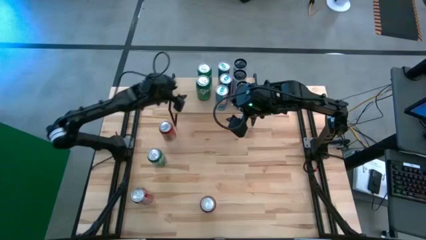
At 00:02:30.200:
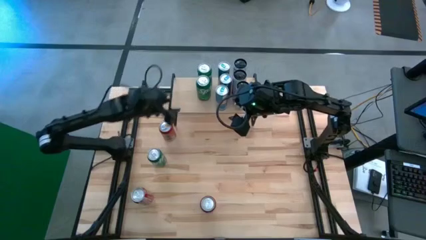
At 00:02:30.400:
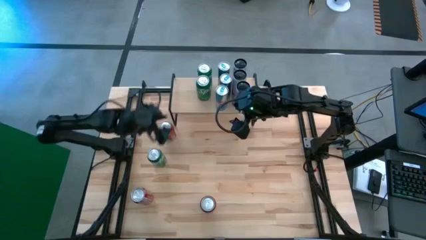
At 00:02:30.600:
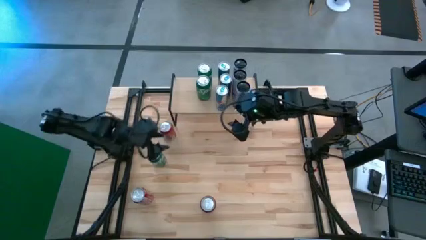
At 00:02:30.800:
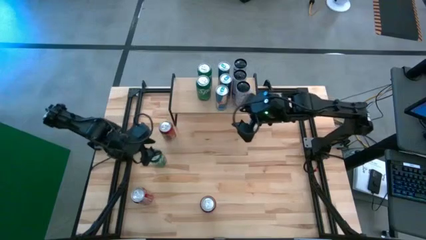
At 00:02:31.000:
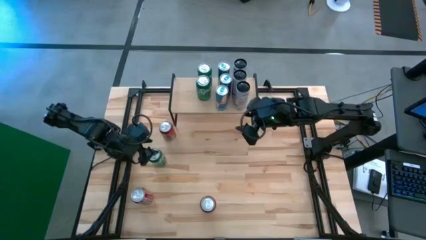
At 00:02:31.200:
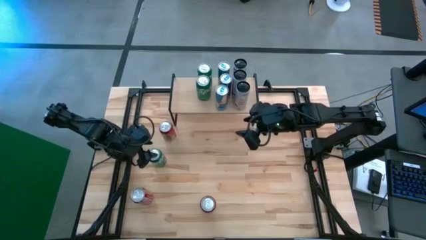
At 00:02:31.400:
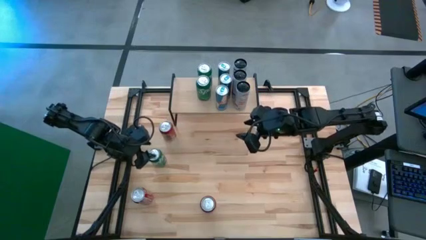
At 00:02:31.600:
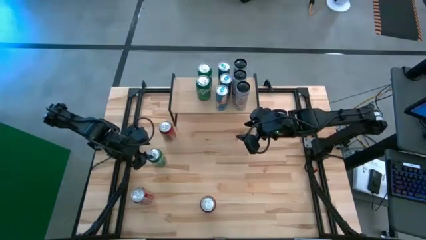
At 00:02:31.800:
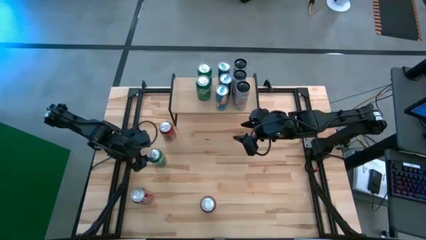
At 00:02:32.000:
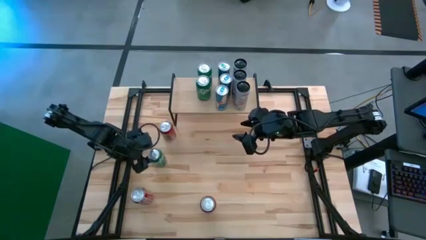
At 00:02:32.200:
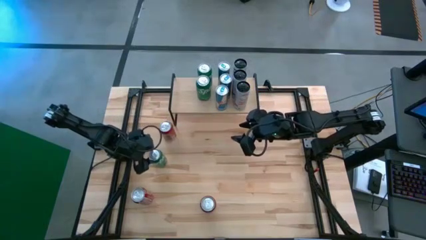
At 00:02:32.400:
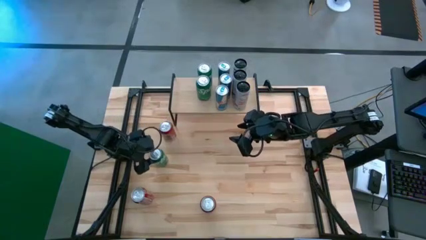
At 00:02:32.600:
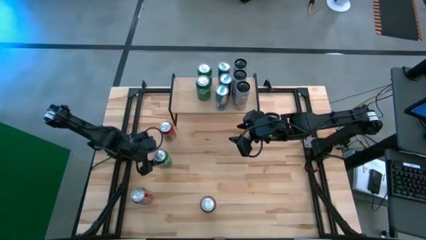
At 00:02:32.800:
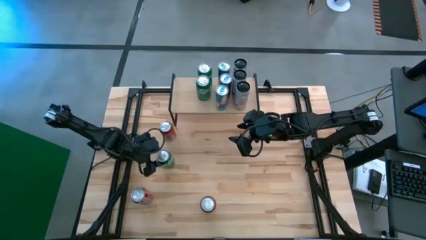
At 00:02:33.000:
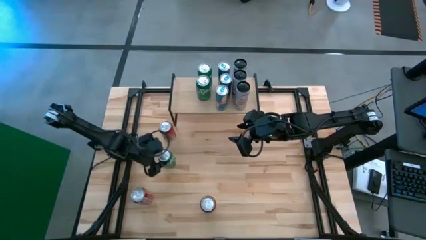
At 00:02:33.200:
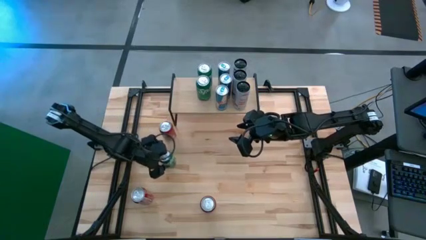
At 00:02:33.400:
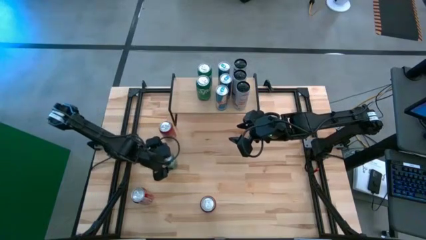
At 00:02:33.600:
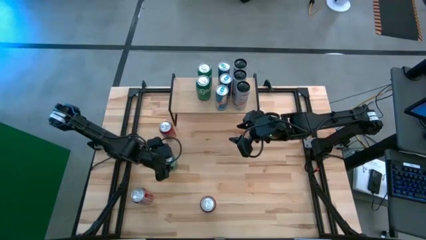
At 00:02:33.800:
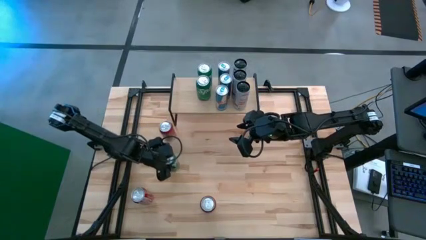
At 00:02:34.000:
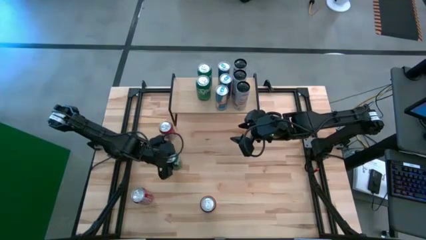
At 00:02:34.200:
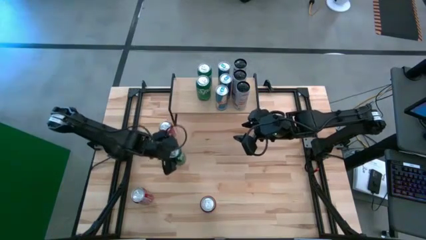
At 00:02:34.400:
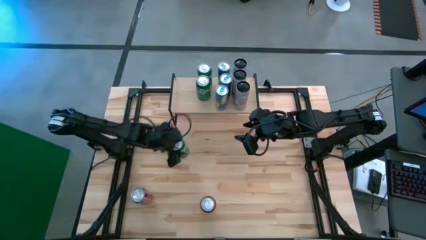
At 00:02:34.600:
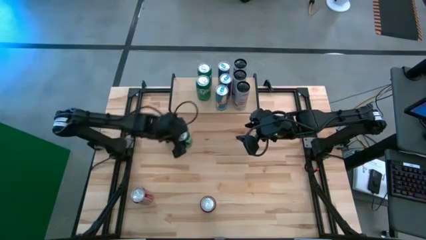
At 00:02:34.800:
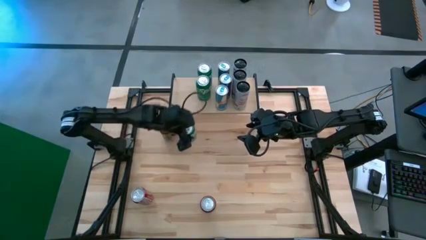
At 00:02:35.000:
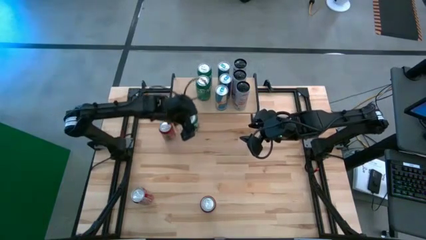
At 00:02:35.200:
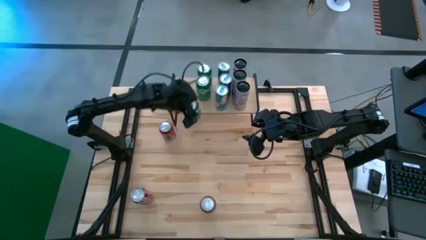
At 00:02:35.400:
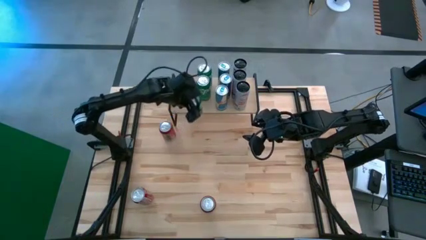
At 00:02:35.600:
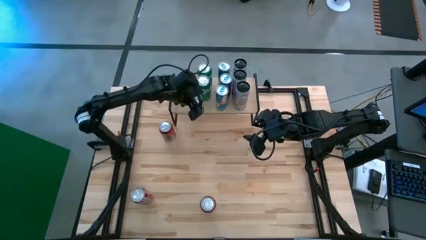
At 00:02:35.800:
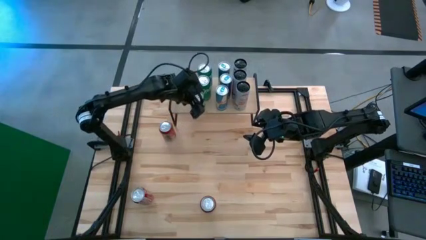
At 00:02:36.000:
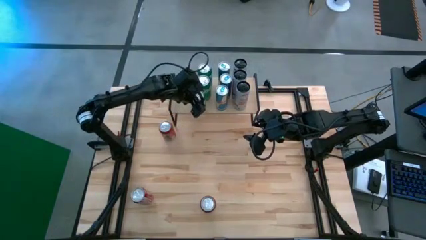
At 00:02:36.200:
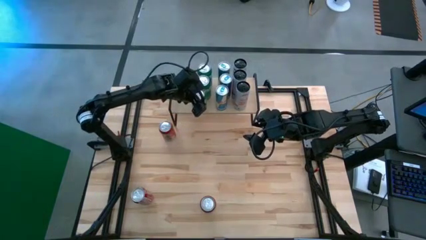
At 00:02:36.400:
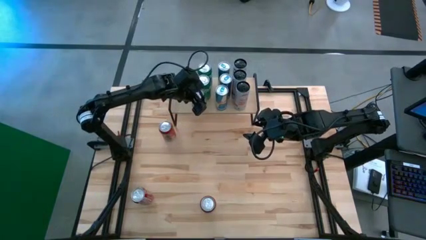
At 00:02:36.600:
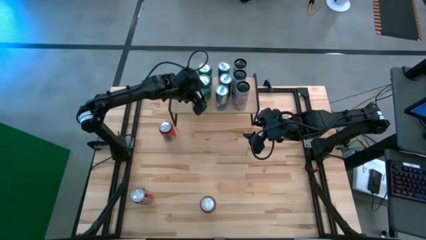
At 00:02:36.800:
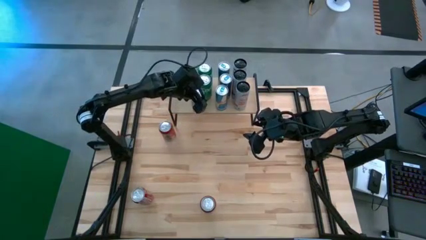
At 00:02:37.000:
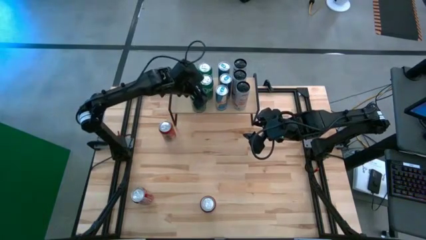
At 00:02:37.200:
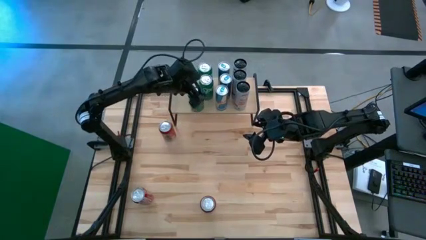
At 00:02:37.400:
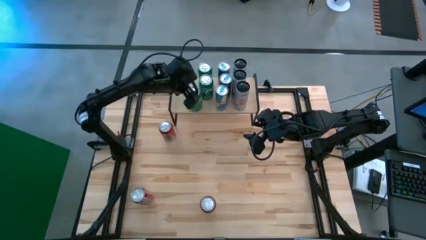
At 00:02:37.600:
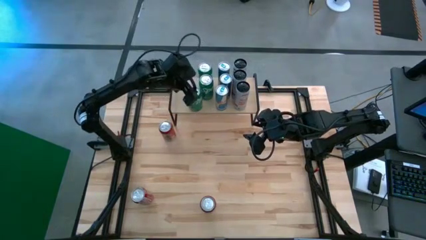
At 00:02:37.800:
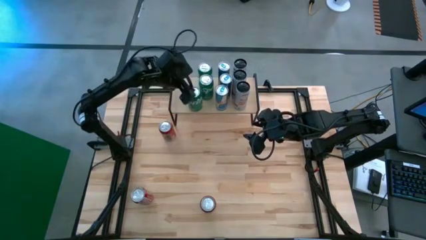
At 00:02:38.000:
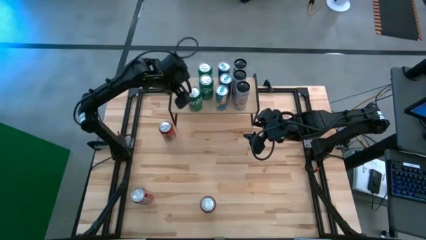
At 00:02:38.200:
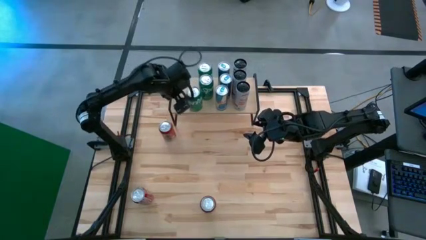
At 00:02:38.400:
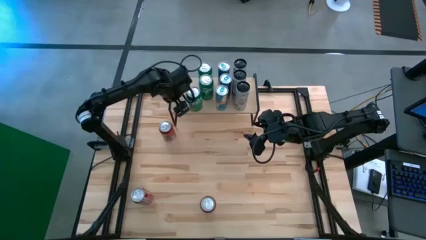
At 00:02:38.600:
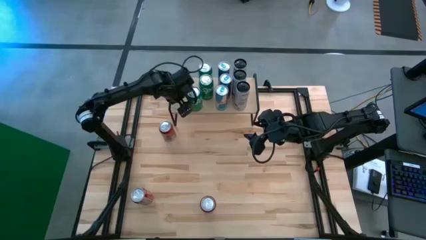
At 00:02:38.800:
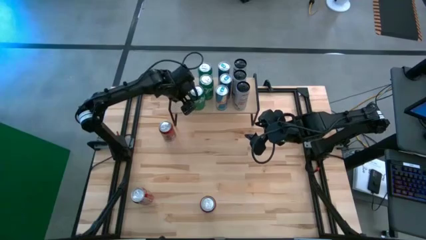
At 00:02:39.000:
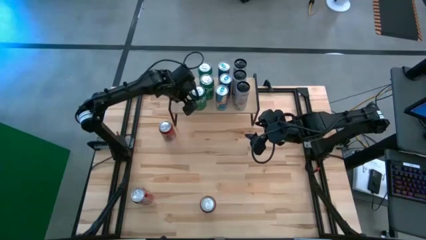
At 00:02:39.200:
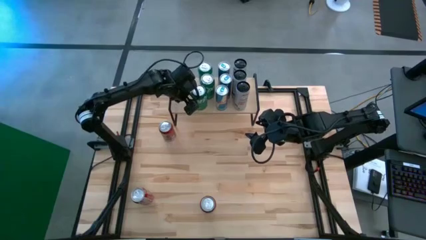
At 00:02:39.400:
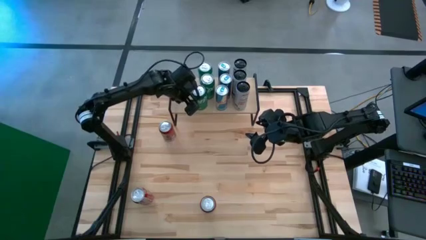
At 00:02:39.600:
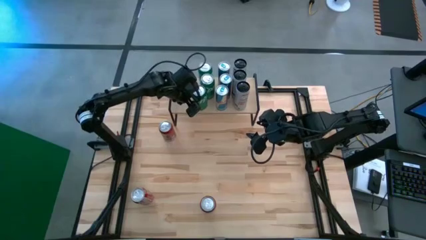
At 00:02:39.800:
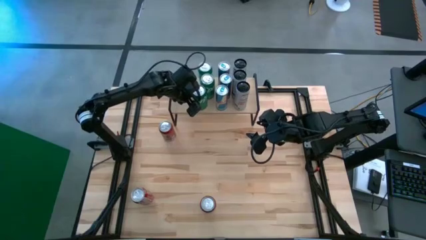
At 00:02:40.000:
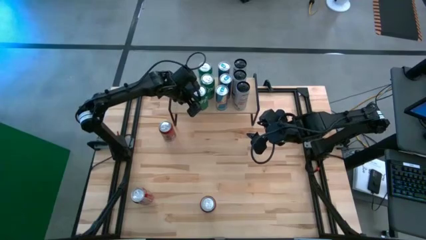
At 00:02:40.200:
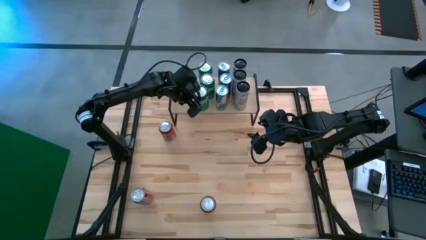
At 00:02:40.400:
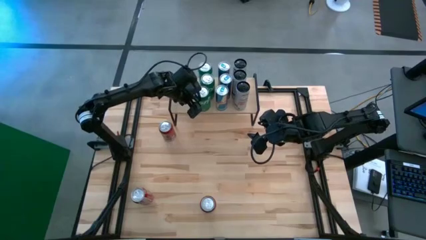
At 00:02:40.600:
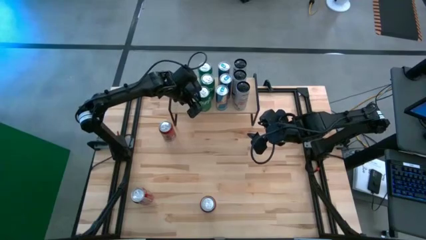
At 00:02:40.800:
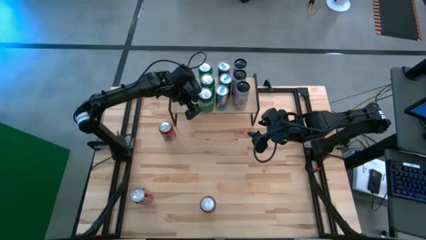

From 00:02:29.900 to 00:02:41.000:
Task: Place canned beverage on shelf
Put the green soda can on the shelf aligned with the other green soda can

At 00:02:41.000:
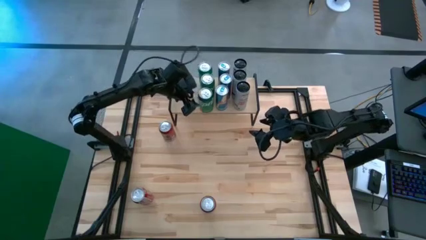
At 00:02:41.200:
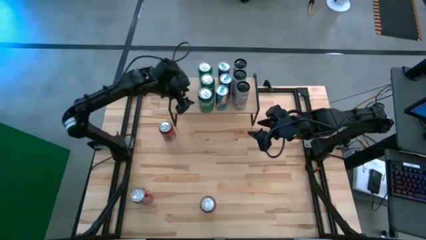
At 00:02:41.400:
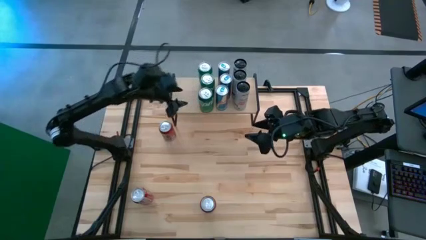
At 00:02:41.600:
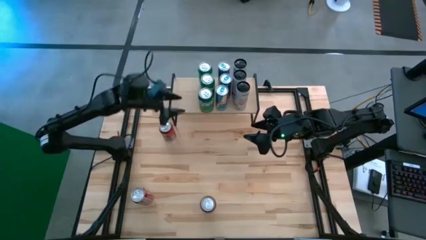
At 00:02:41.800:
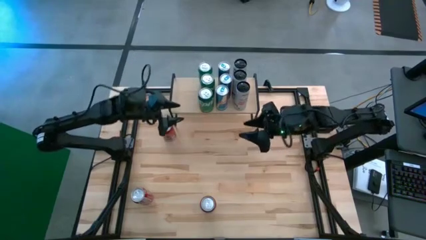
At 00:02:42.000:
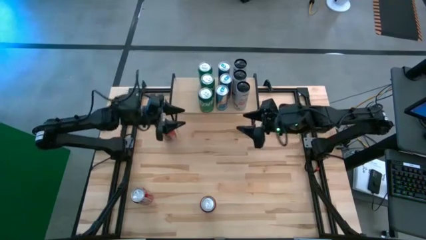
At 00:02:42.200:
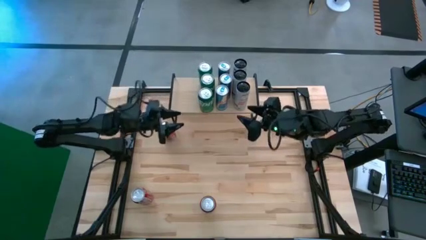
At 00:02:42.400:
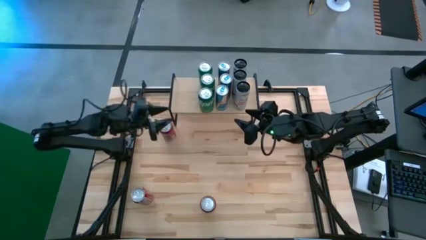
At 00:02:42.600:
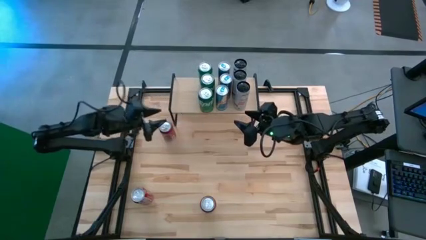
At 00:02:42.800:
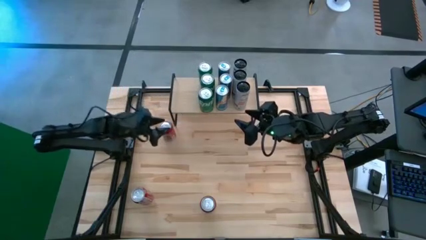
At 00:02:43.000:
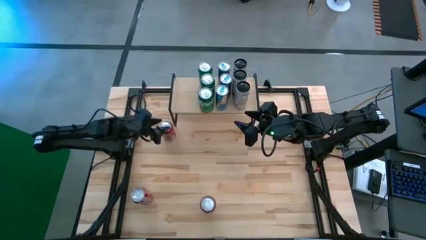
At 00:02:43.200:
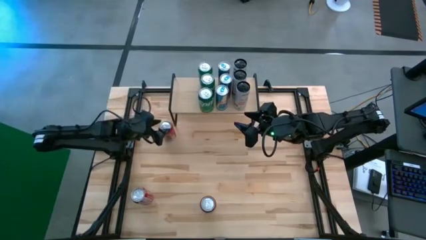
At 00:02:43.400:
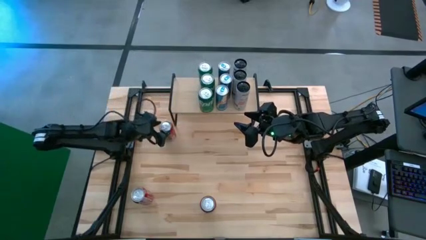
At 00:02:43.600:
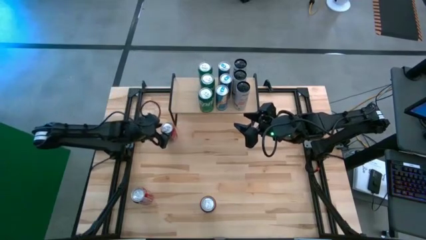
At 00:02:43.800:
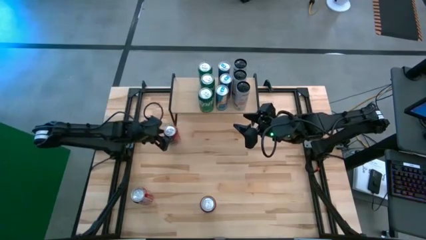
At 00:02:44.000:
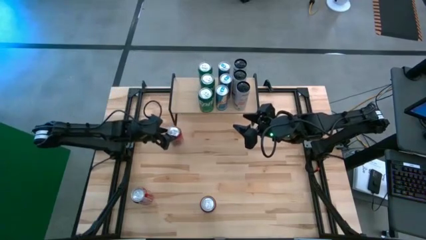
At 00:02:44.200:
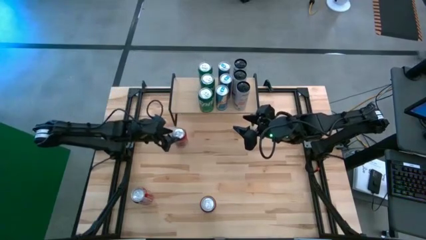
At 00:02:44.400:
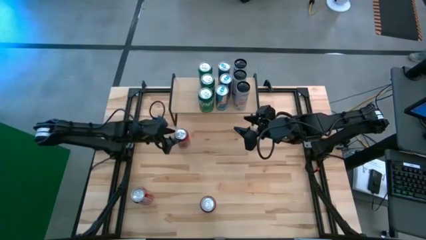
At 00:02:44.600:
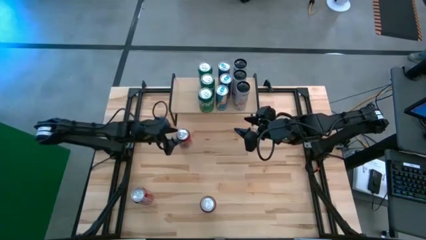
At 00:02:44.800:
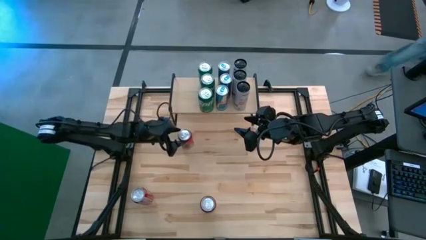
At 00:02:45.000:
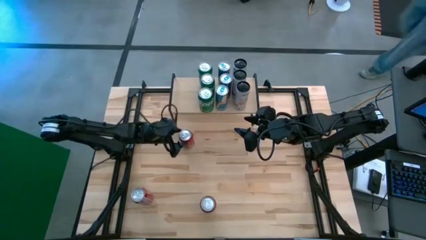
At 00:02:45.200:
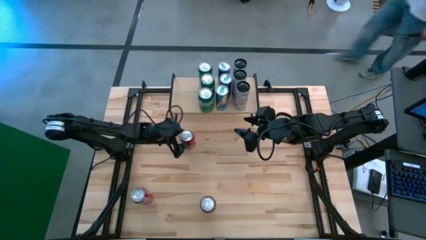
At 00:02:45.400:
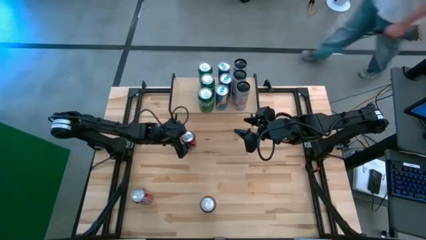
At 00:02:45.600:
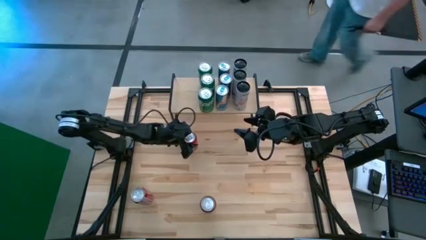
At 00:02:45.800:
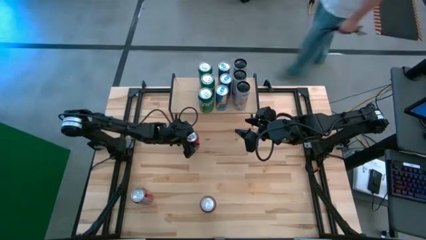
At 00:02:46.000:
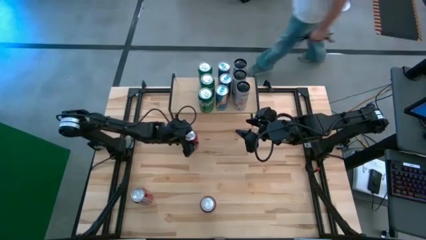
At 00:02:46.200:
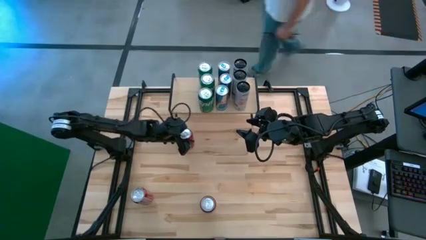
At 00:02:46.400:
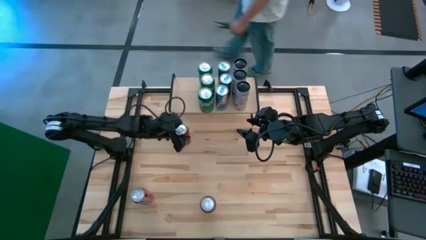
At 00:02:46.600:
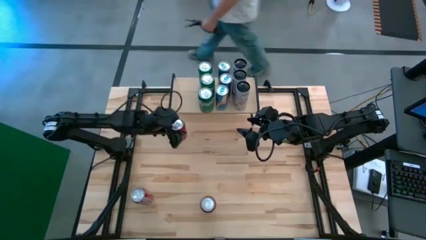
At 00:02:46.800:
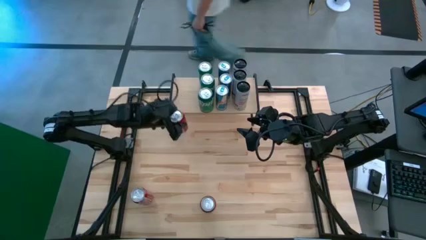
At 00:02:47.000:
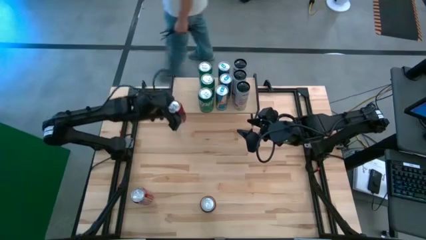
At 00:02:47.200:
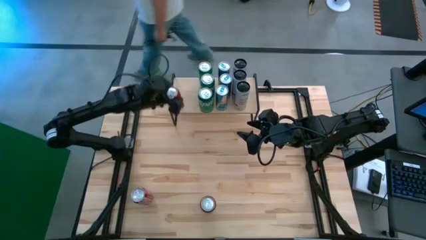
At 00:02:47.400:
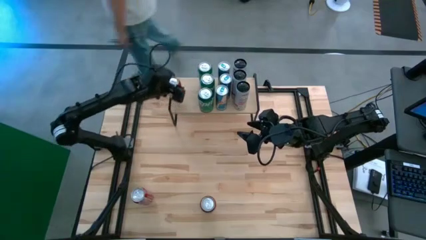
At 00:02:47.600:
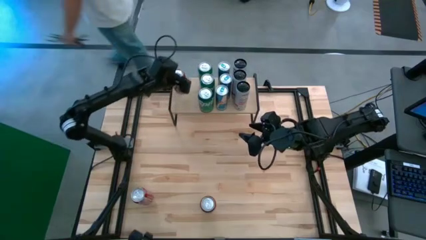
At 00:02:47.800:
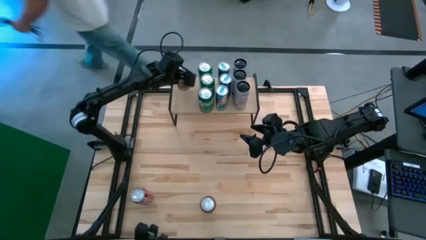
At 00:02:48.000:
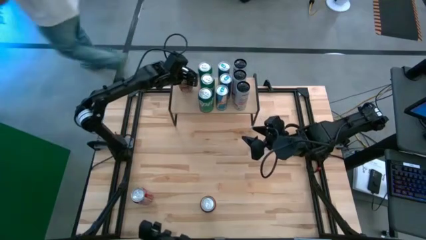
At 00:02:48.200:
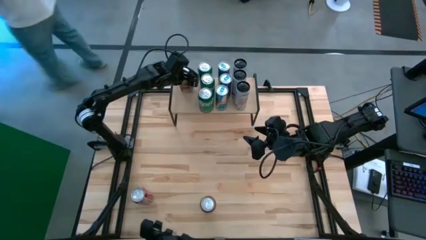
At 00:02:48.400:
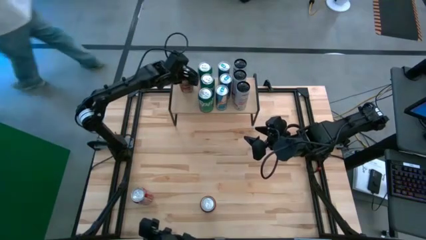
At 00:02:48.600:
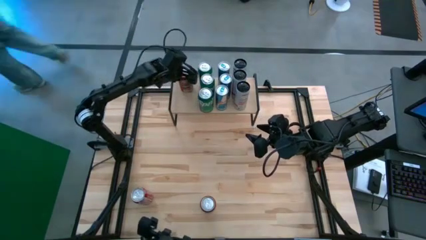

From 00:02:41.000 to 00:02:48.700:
Put the top left red soda can on the shelf
